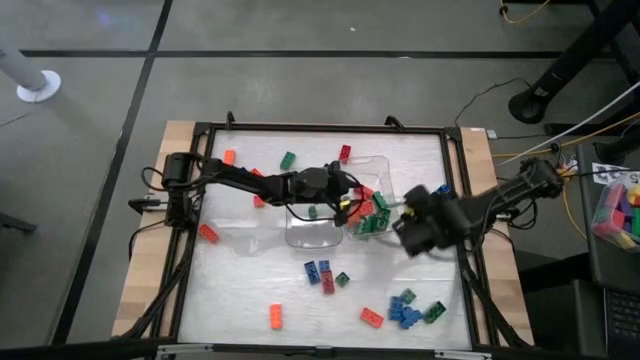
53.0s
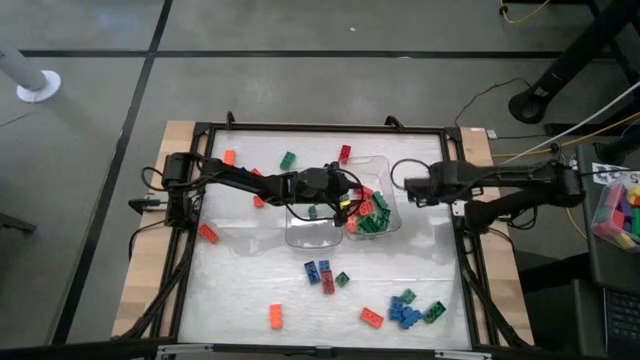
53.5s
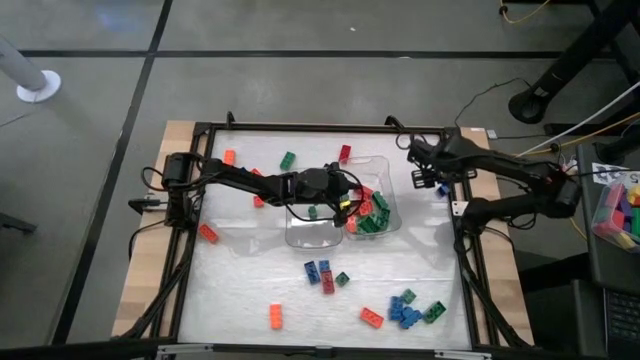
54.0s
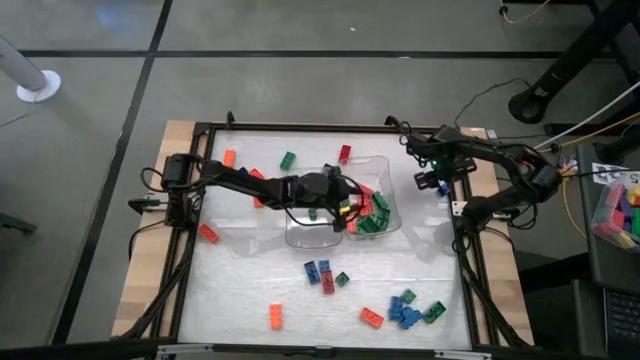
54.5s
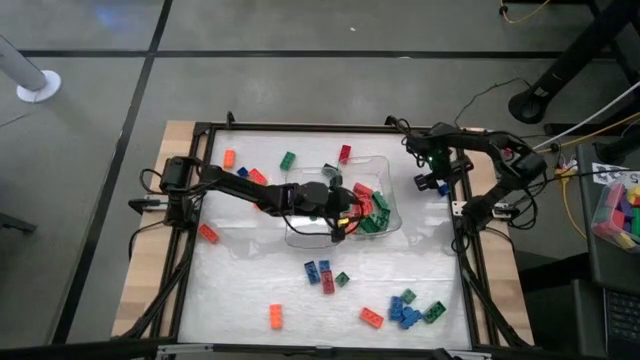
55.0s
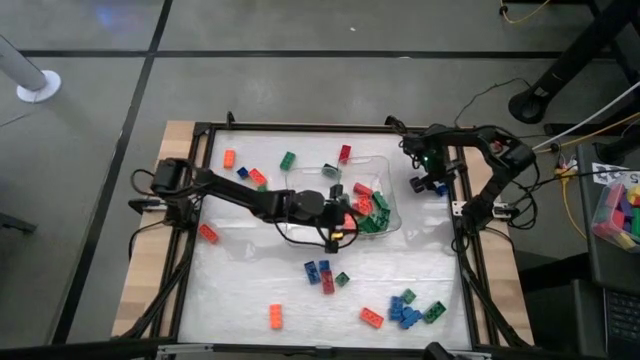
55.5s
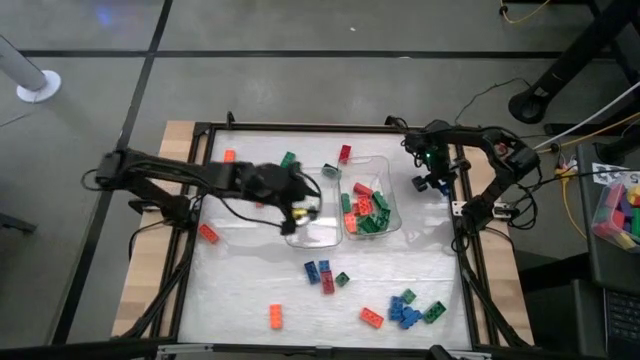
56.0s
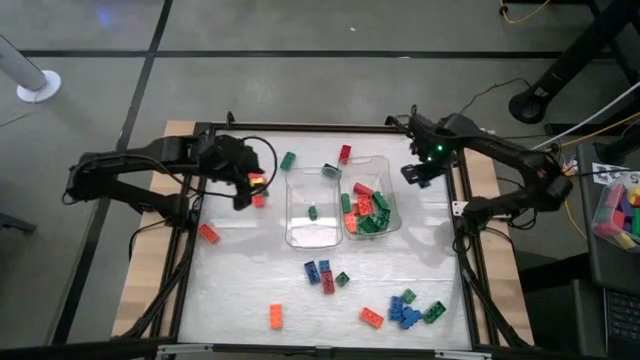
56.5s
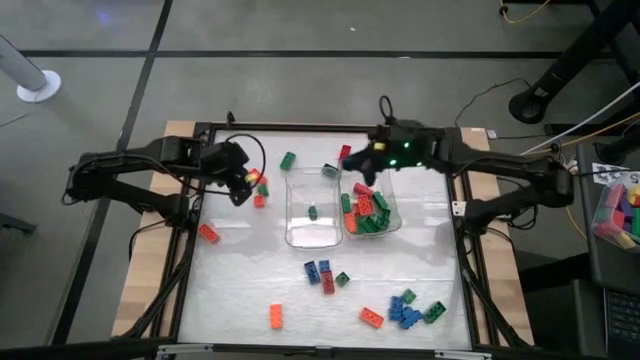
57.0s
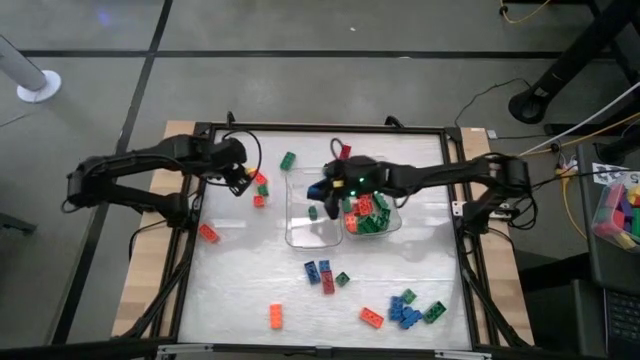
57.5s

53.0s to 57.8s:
Task: Sort blocks by size
Put the blue square game piece into the left transparent bin

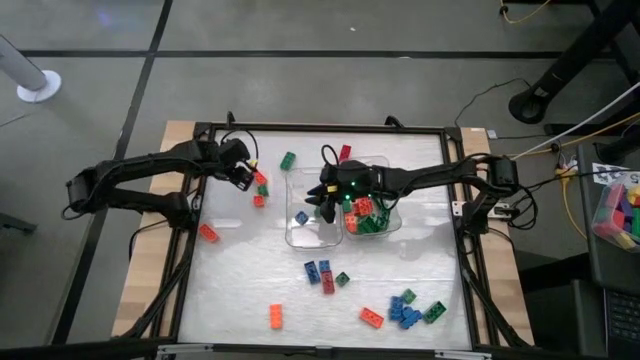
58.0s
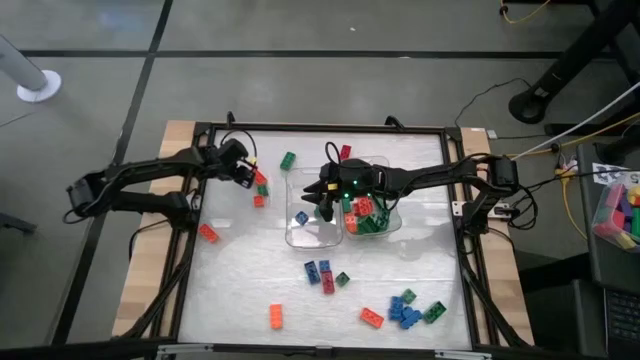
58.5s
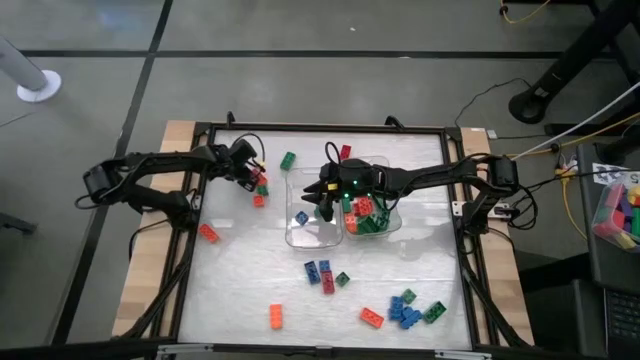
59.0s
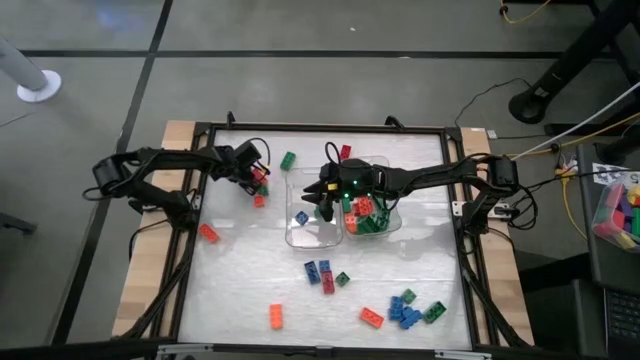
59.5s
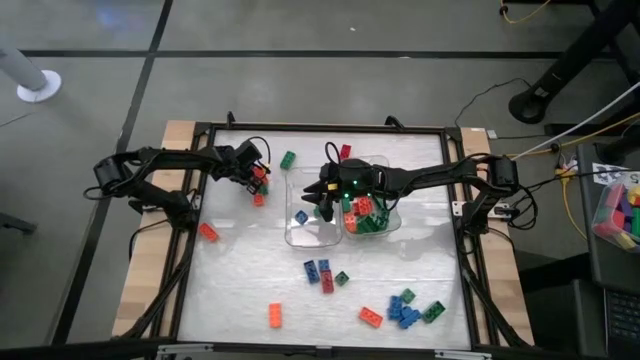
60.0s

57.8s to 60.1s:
Put the blue square game piece into the left transparent bin

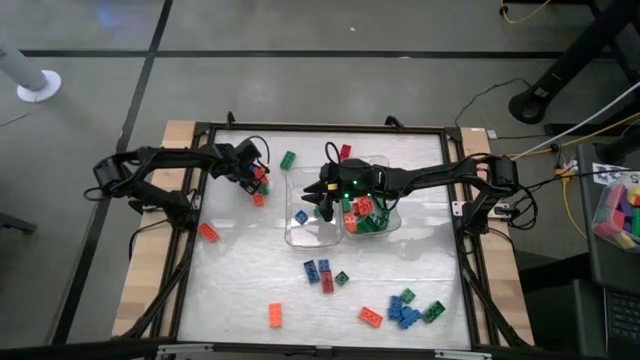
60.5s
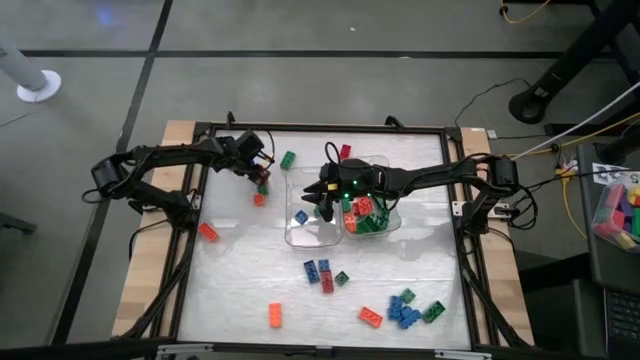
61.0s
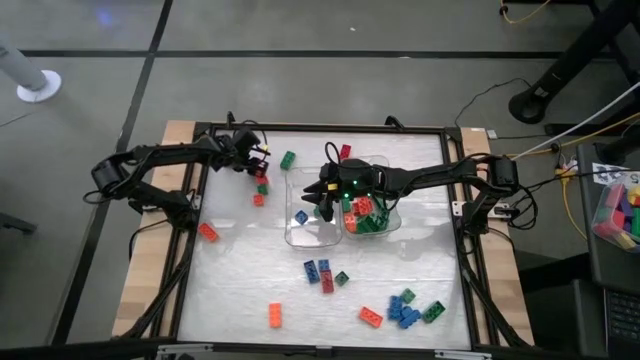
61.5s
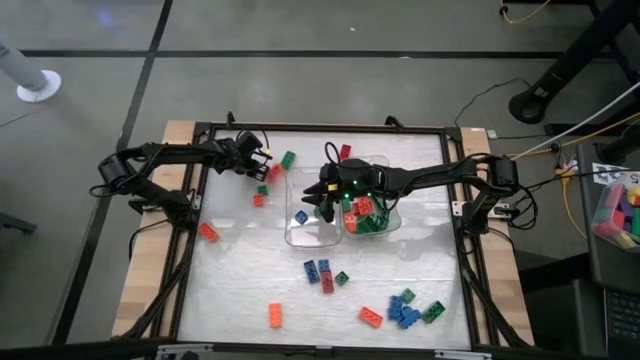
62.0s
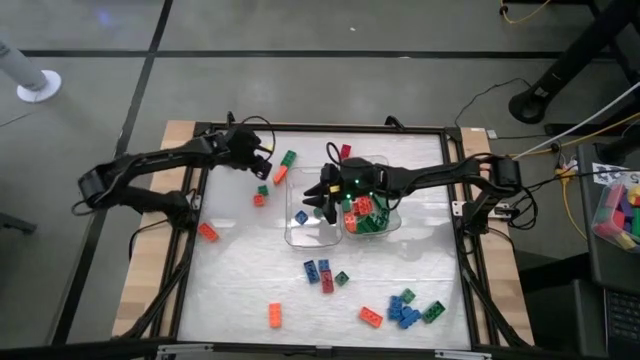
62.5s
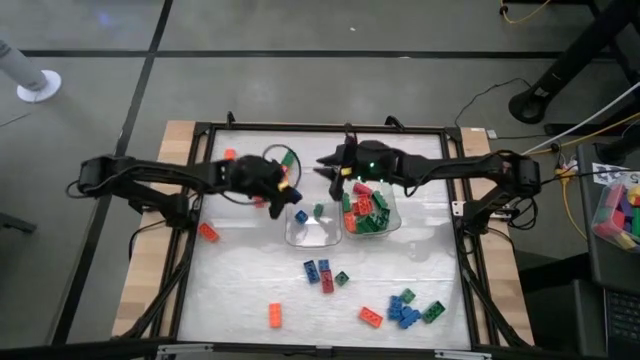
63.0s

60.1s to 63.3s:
Put the blue square game piece into the left transparent bin

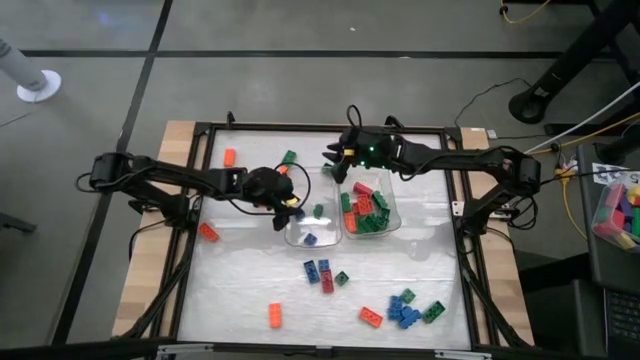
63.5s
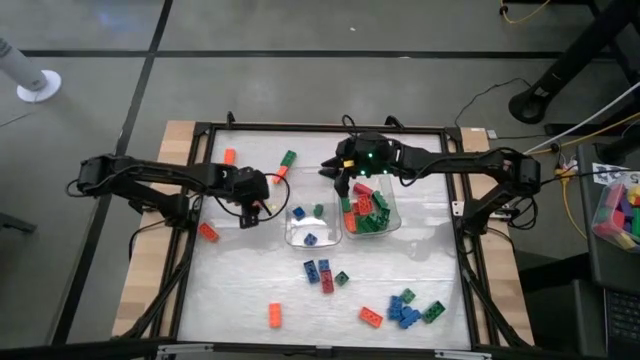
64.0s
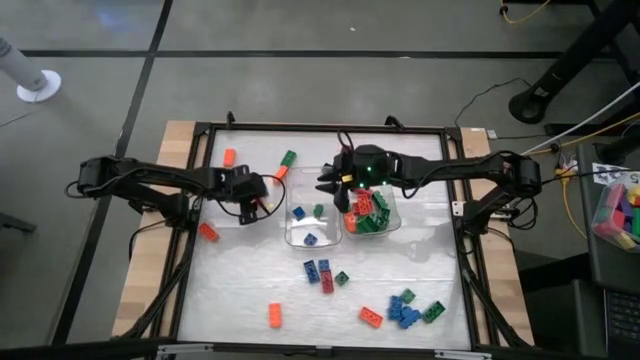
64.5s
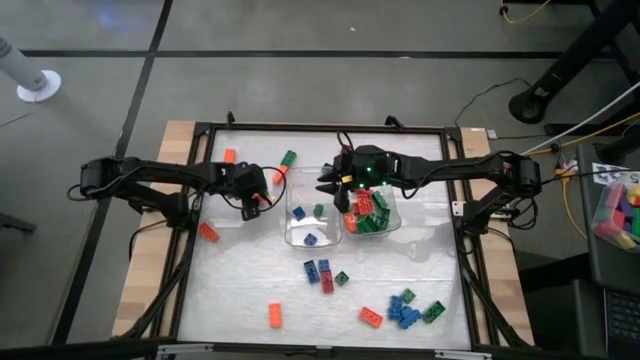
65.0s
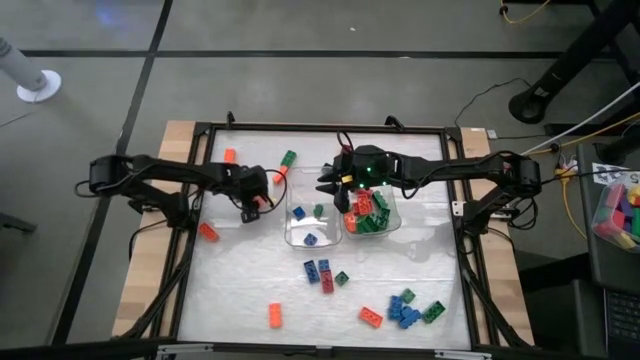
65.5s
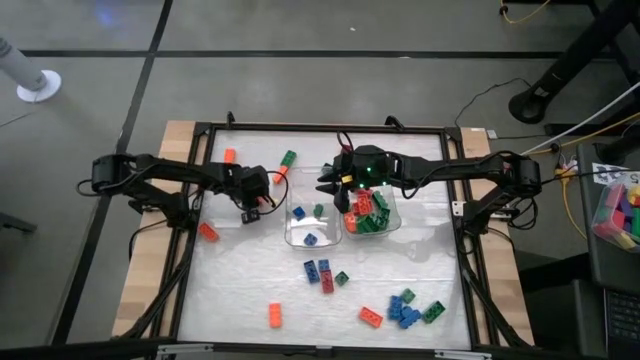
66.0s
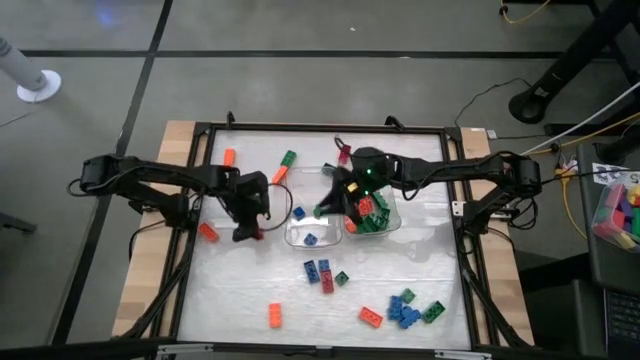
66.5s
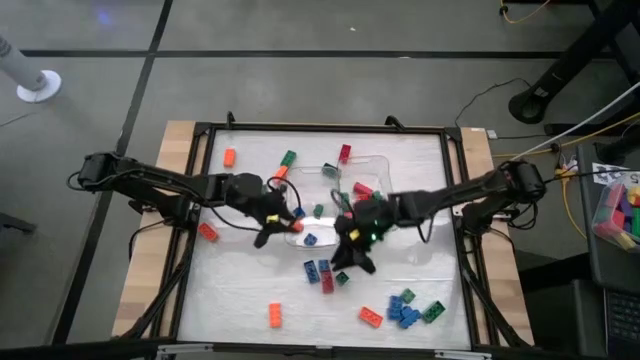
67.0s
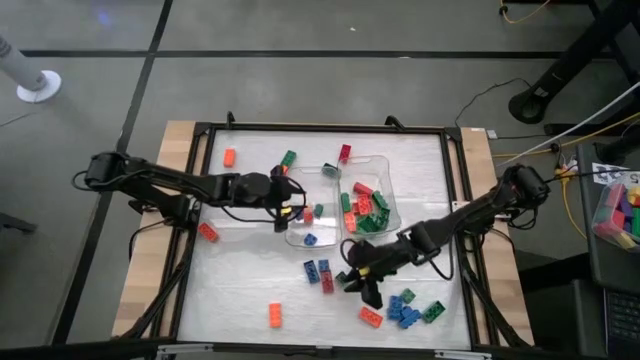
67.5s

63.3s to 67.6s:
Put the orange square game piece into the left transparent bin

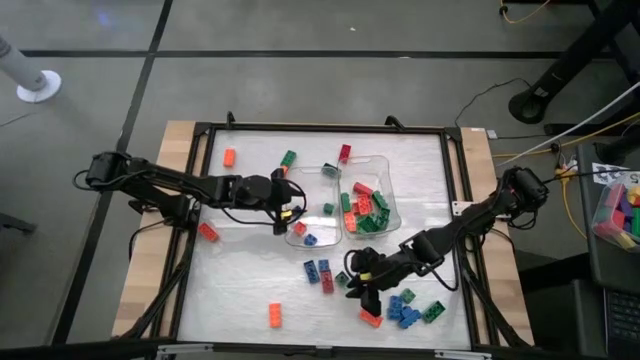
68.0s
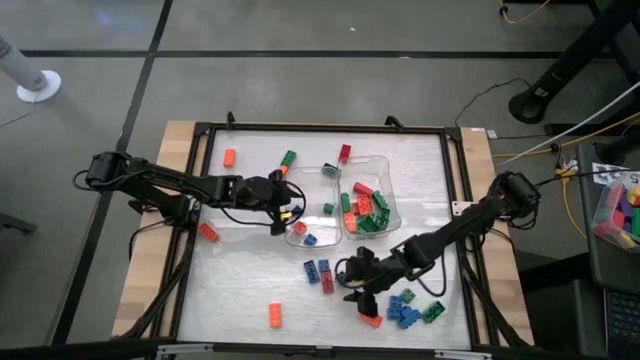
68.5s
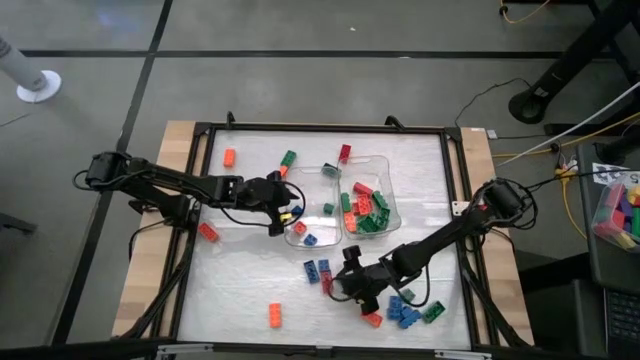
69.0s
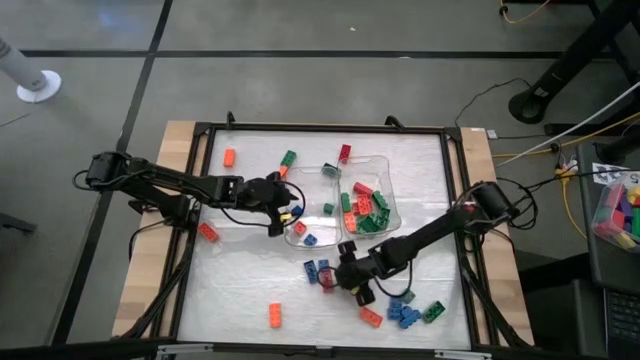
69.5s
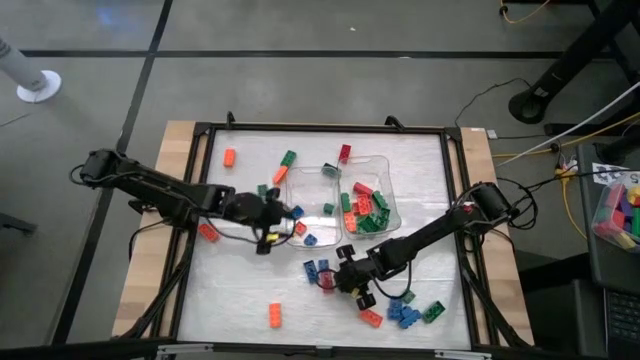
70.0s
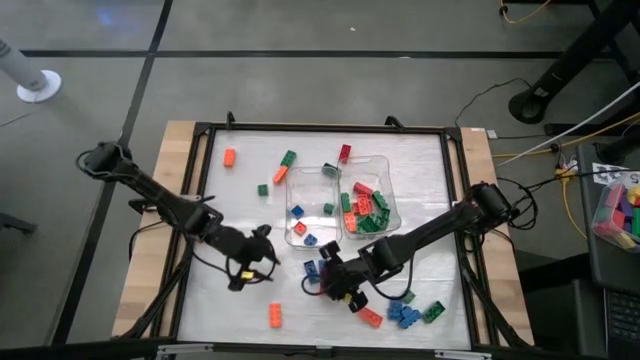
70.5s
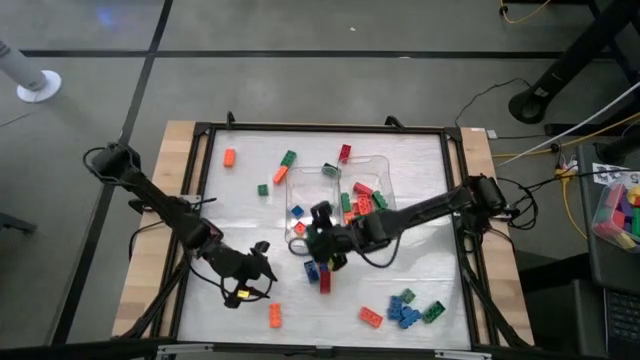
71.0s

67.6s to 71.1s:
Put the green square game piece into the left transparent bin

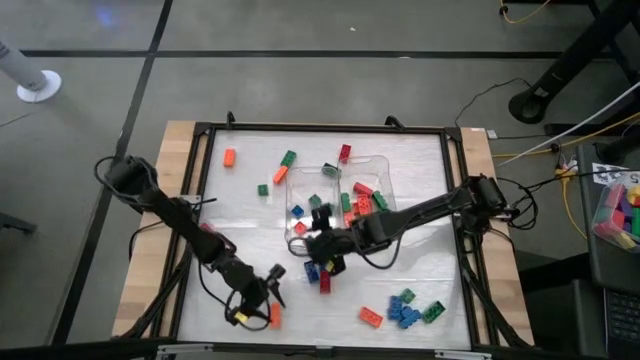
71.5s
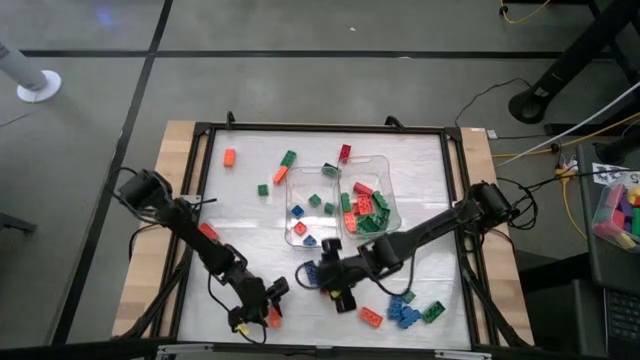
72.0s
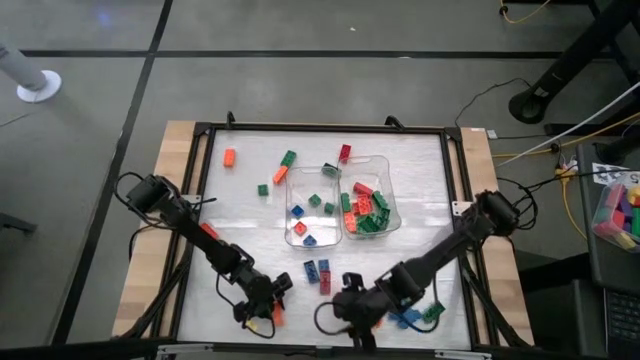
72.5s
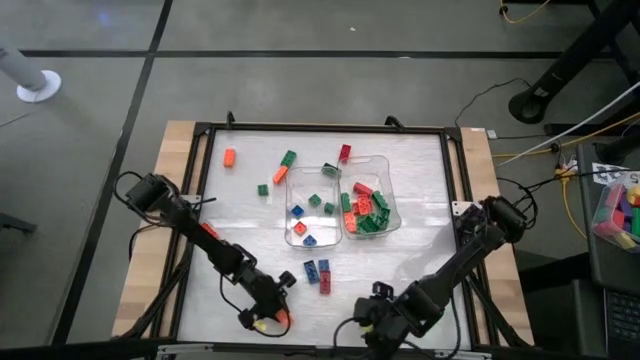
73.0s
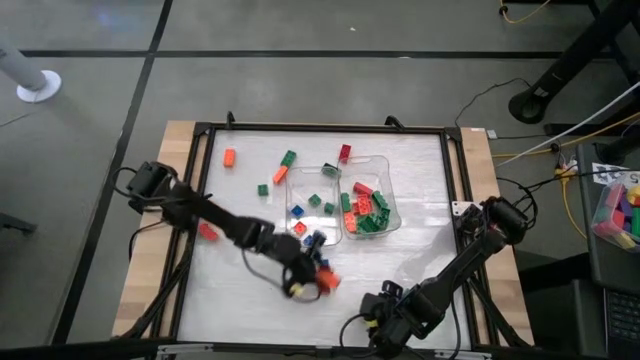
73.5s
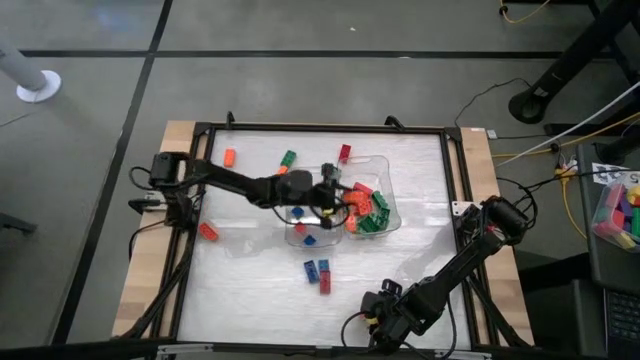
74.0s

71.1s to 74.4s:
Put the orange rectangular game piece into the right transparent bin

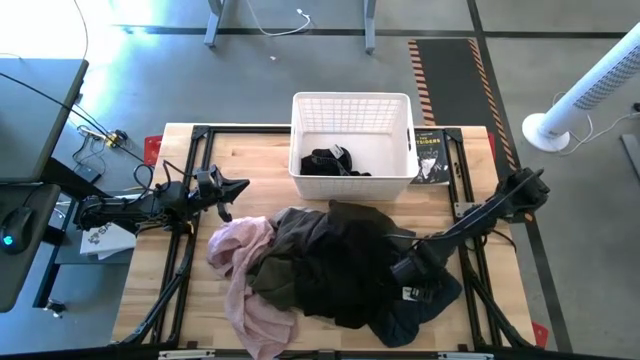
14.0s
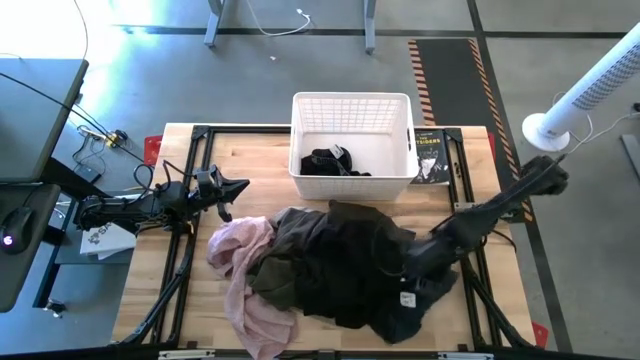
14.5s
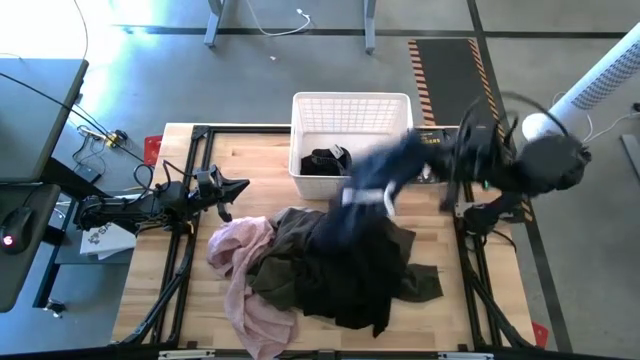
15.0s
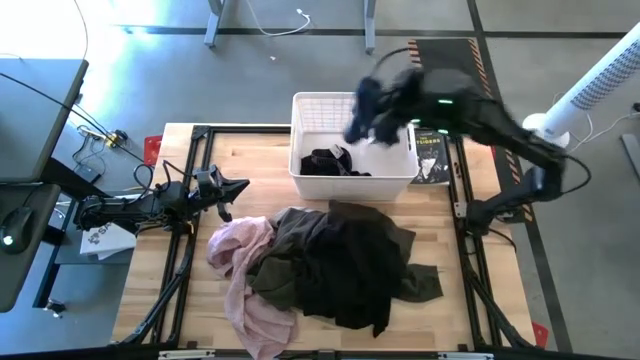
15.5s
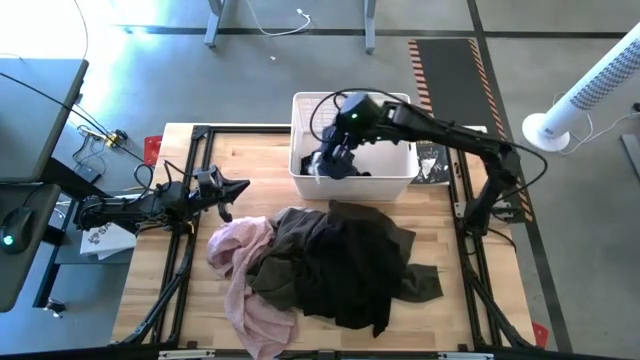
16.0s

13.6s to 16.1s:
Task: Sort clothes
Put the blue shorts into the laundry bin
